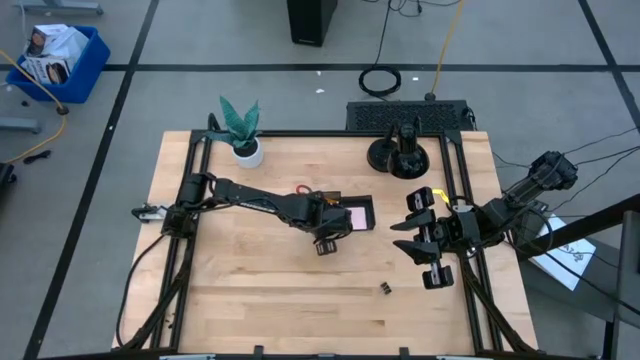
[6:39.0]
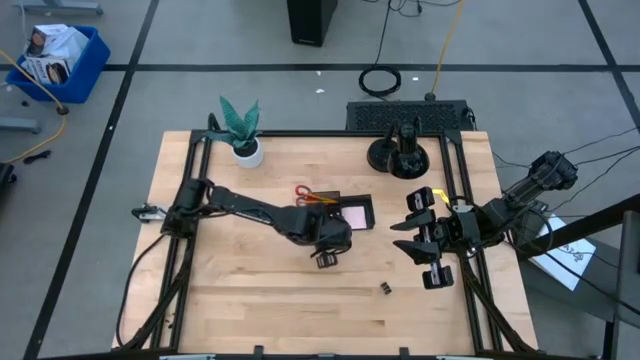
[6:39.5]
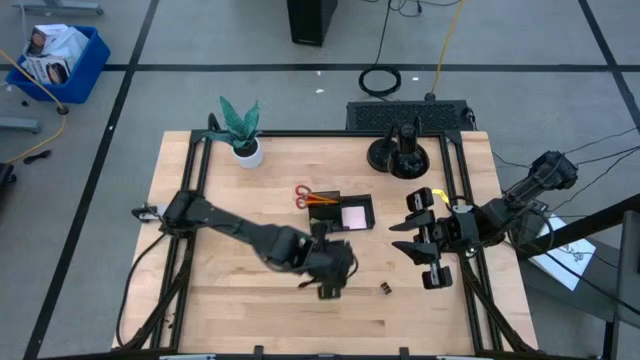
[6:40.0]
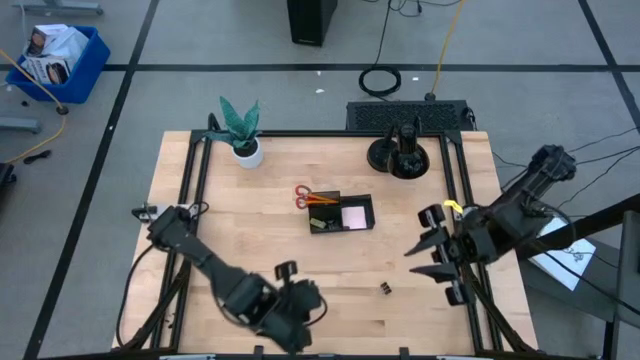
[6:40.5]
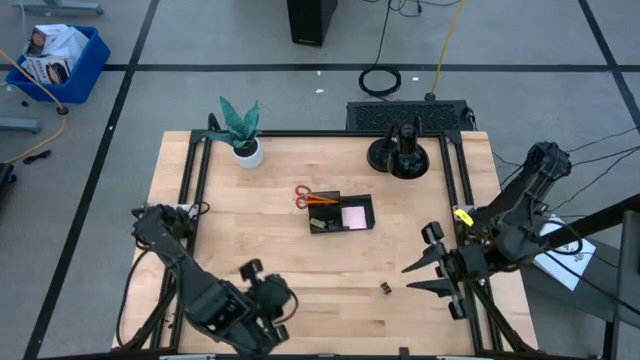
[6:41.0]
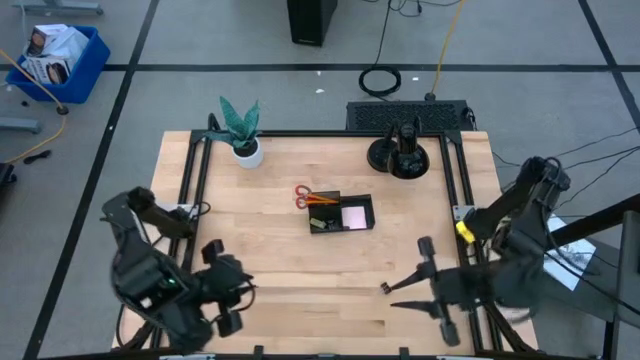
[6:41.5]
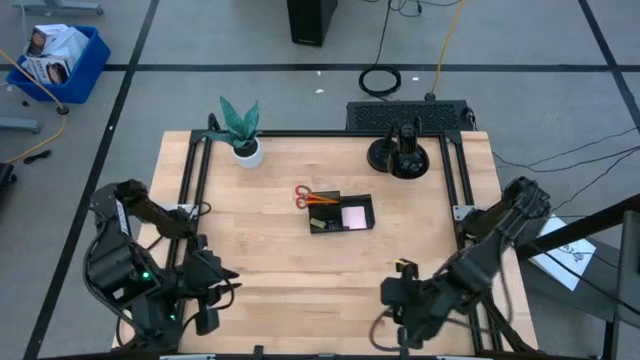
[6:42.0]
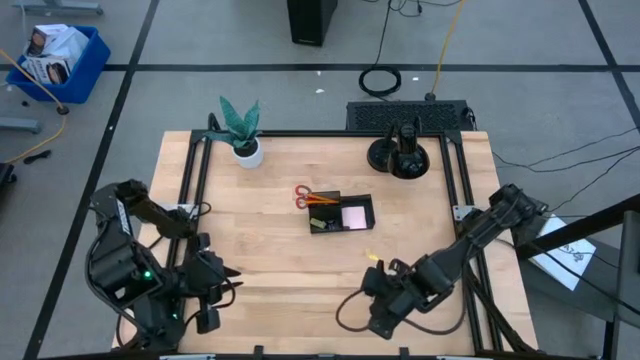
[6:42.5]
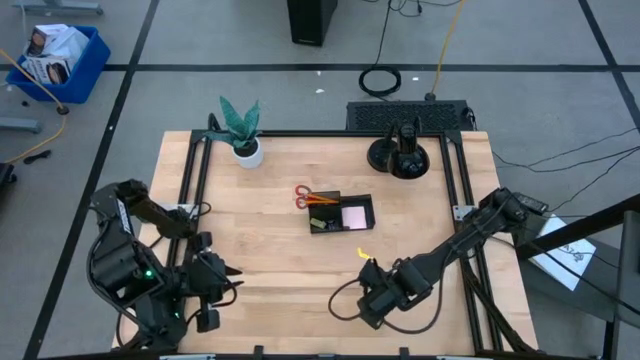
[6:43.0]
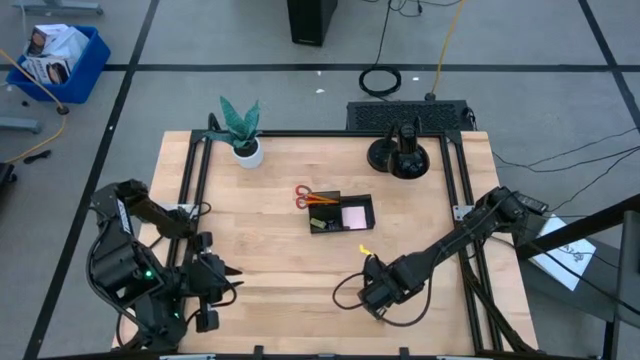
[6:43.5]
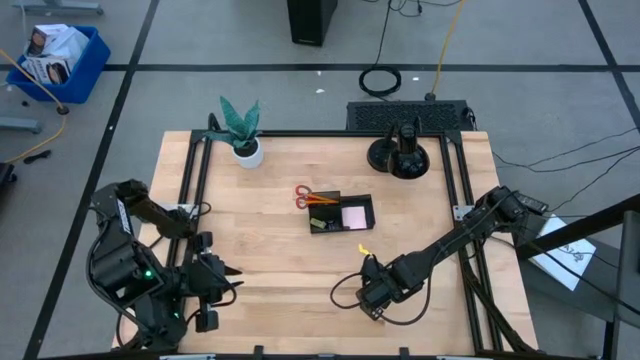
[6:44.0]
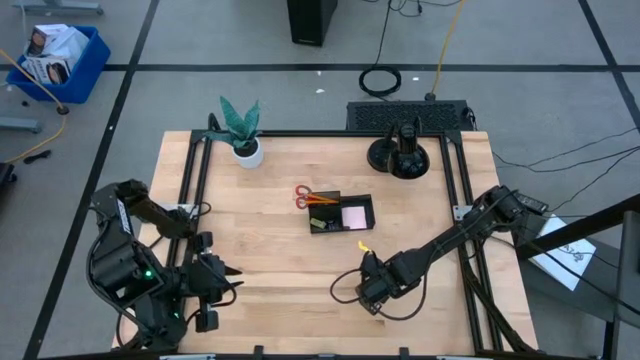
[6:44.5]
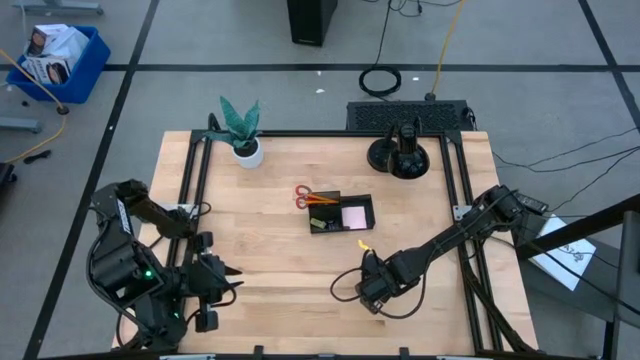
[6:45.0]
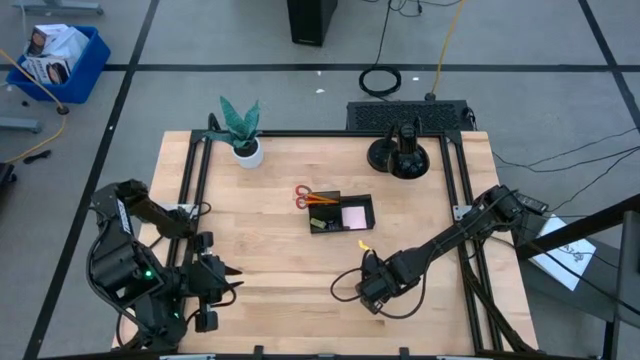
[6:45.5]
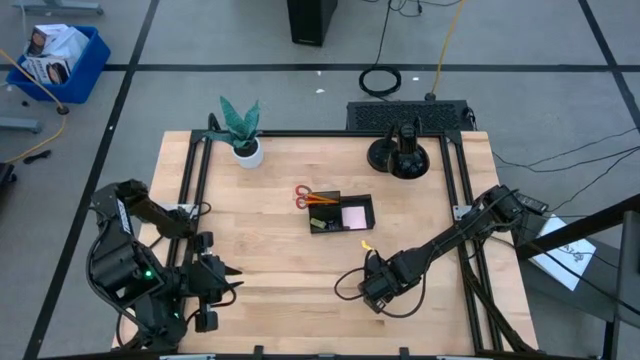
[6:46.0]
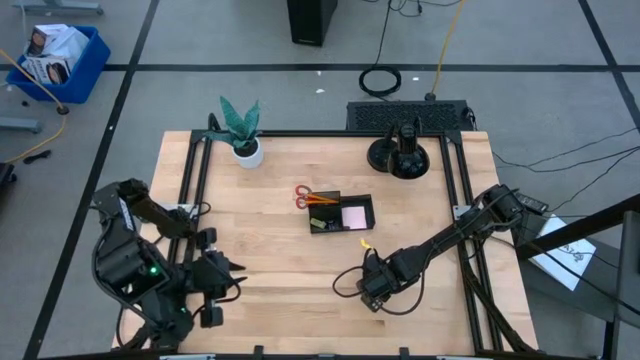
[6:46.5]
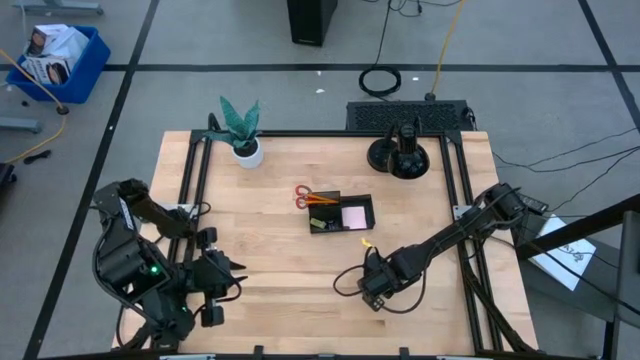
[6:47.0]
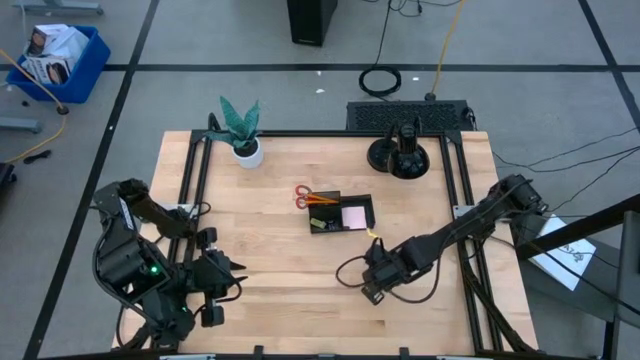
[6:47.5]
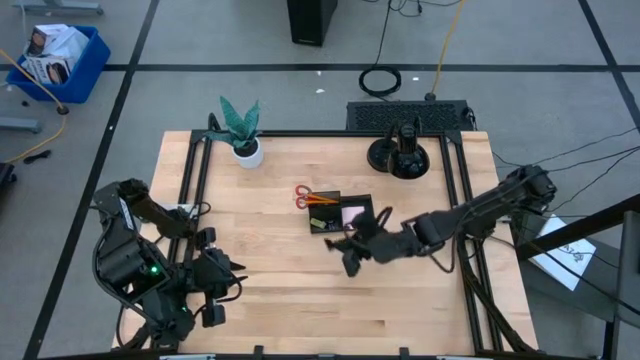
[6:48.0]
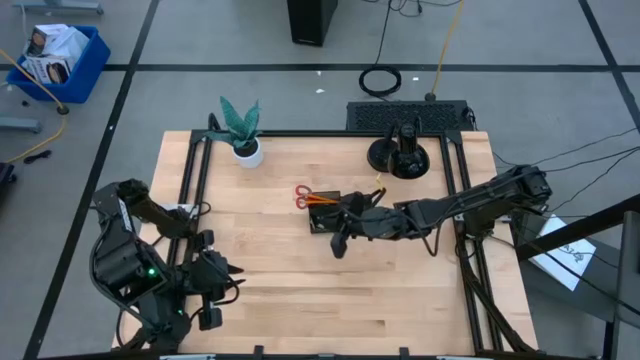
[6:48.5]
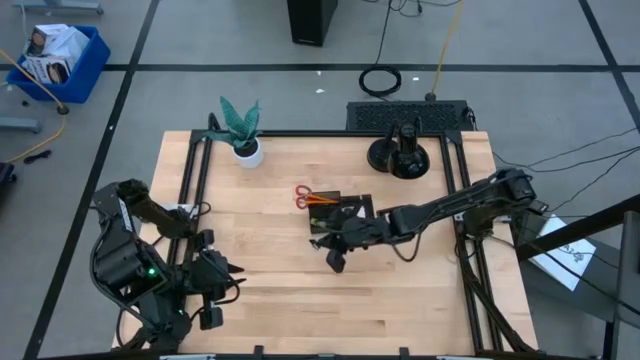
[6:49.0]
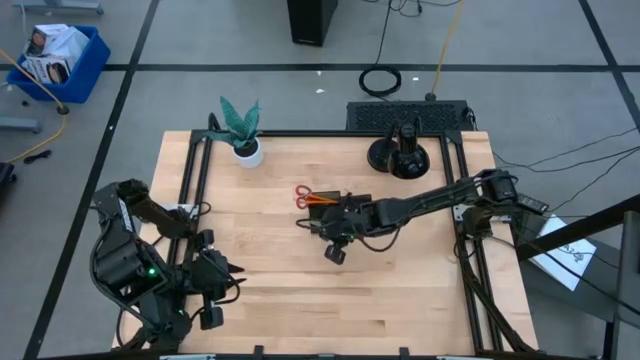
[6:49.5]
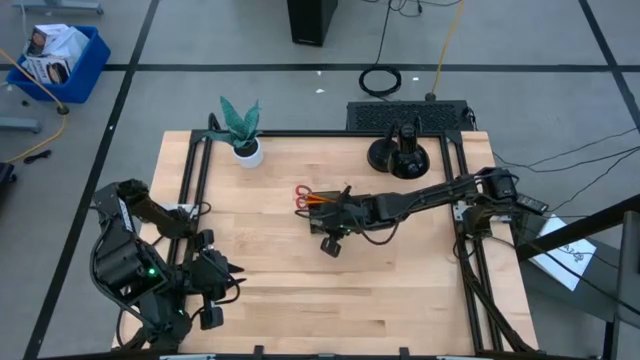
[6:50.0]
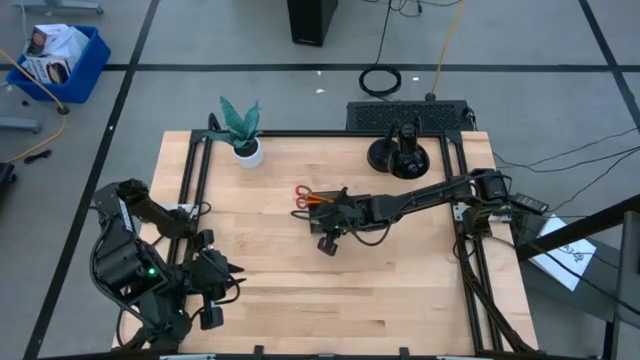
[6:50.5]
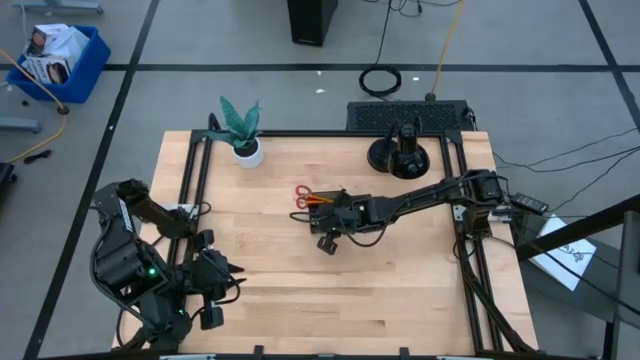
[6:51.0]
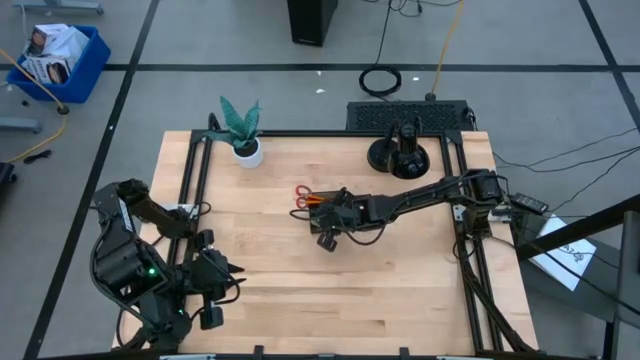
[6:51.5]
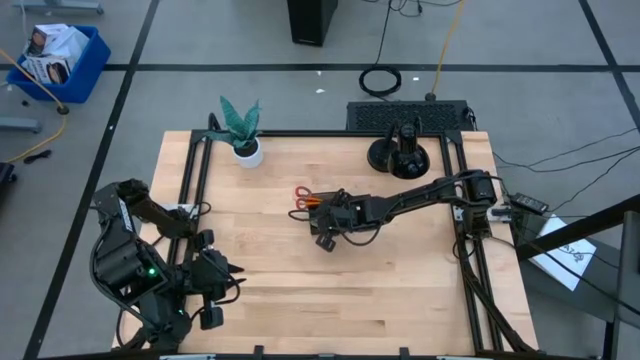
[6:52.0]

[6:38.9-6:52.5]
Task: Pick and place office supplies into organizer
Put the black binder clip into the desk organizer

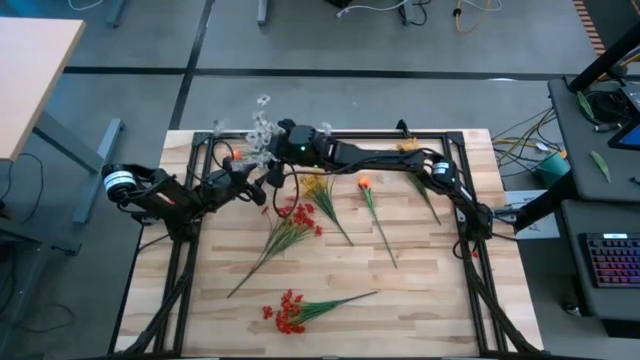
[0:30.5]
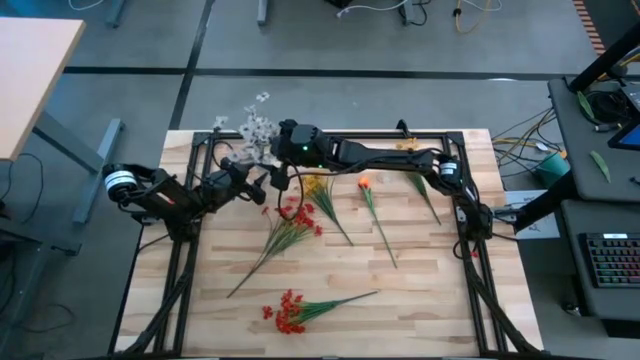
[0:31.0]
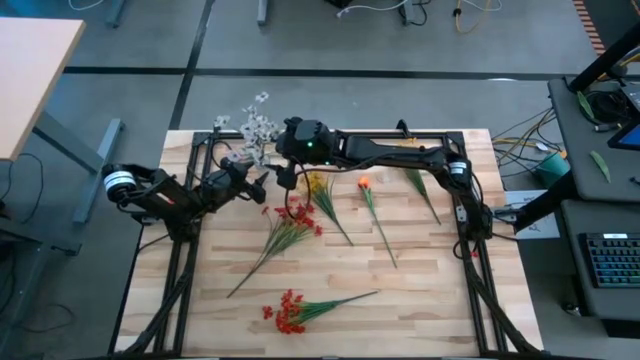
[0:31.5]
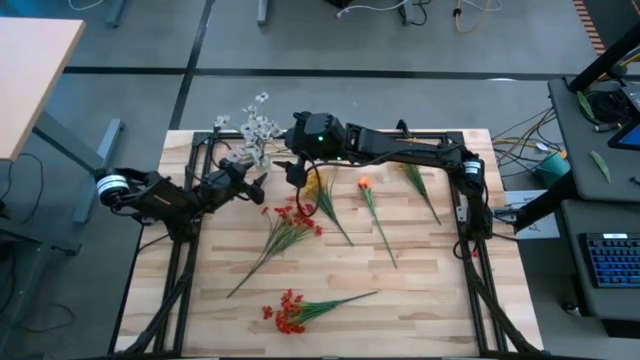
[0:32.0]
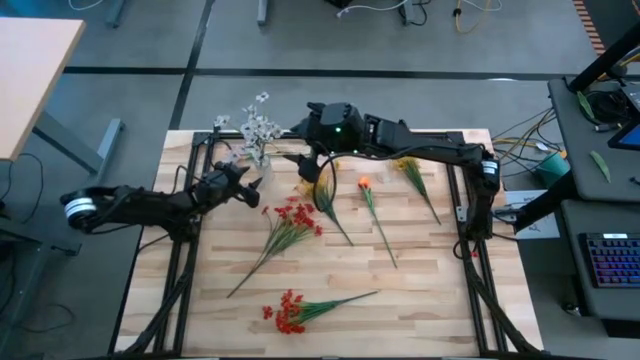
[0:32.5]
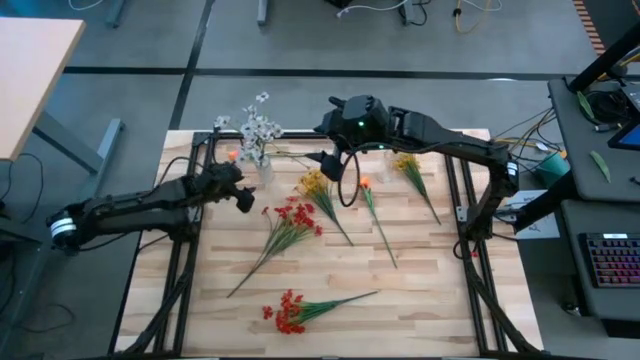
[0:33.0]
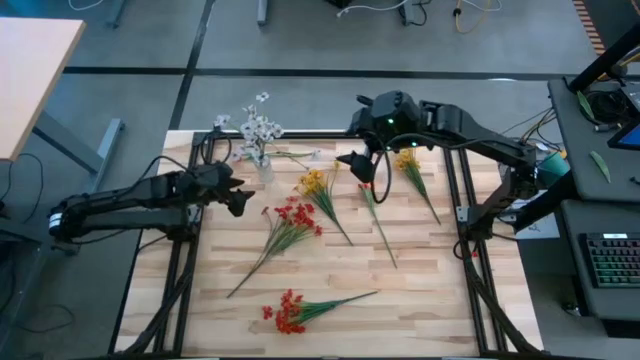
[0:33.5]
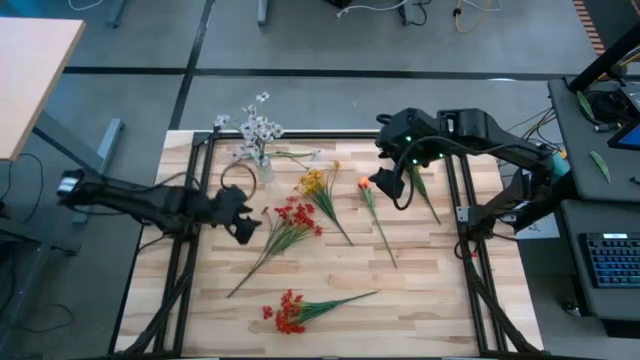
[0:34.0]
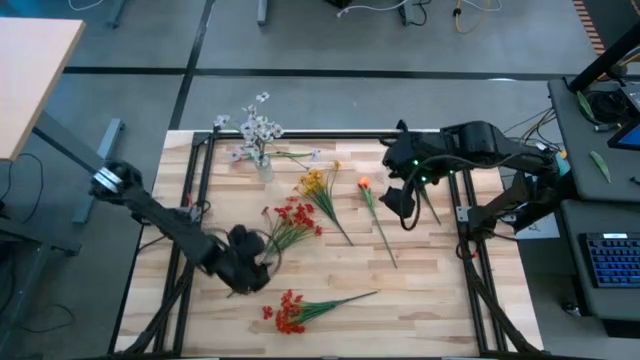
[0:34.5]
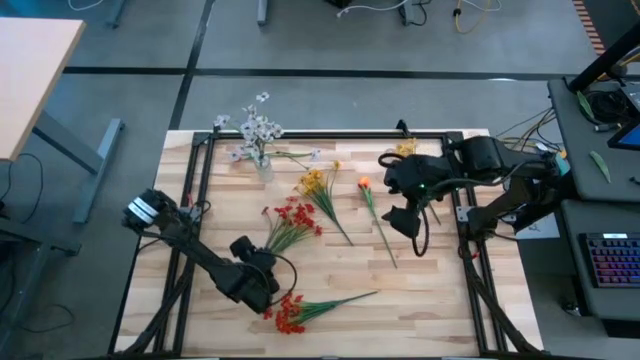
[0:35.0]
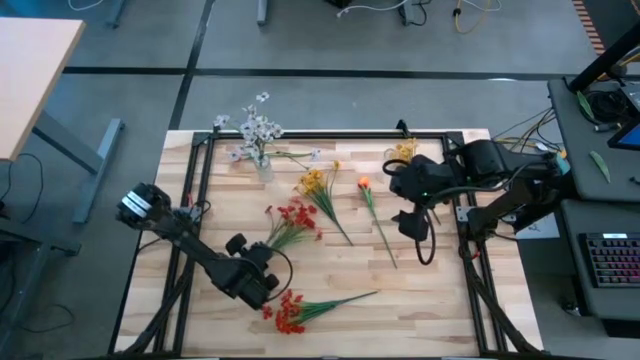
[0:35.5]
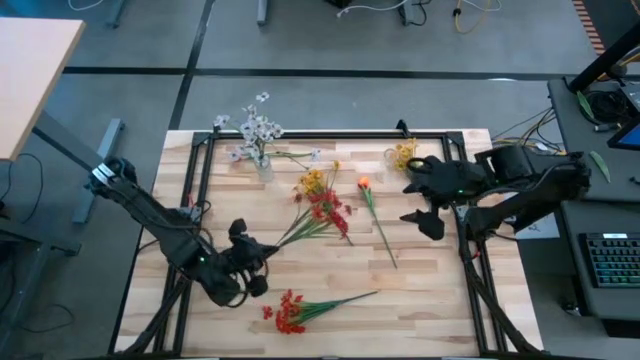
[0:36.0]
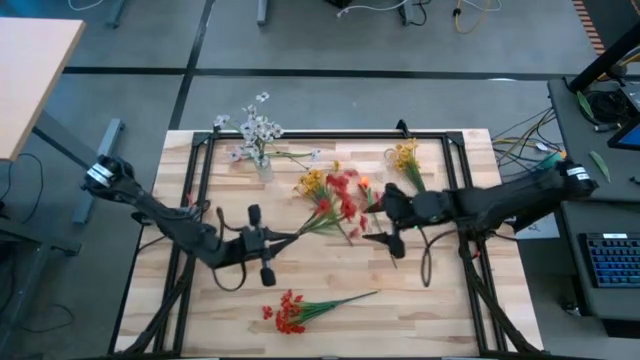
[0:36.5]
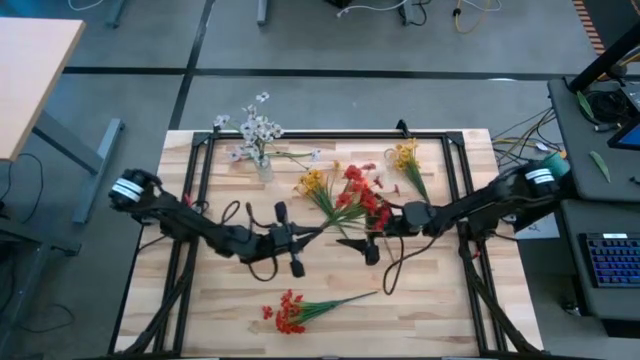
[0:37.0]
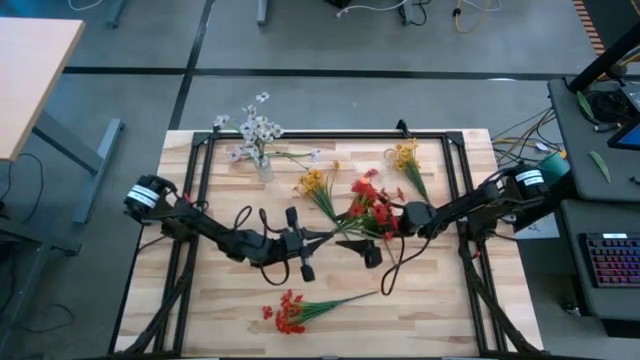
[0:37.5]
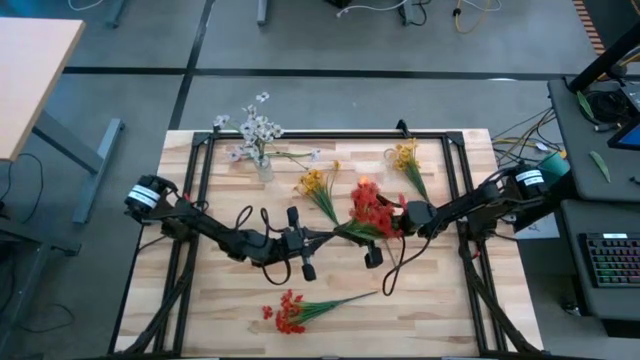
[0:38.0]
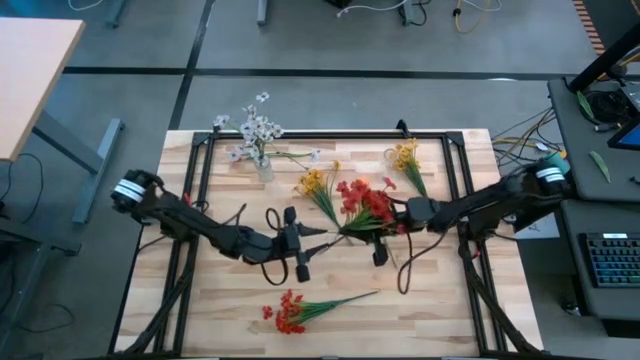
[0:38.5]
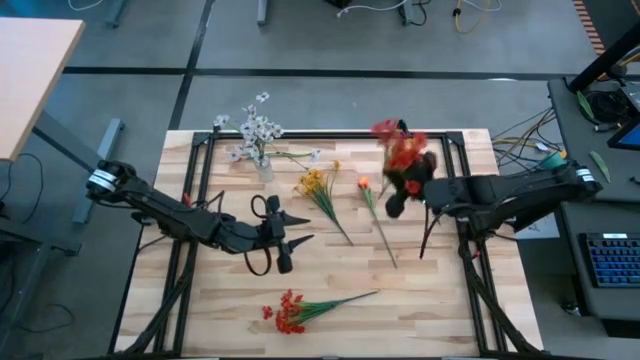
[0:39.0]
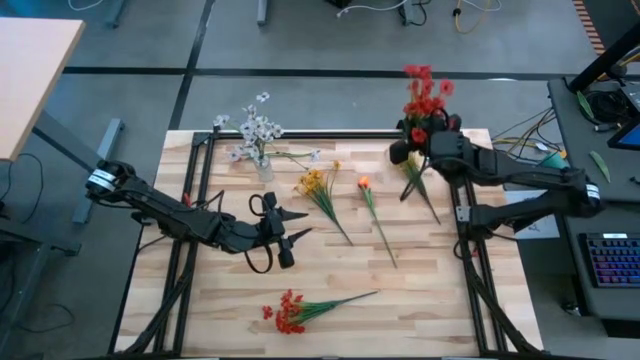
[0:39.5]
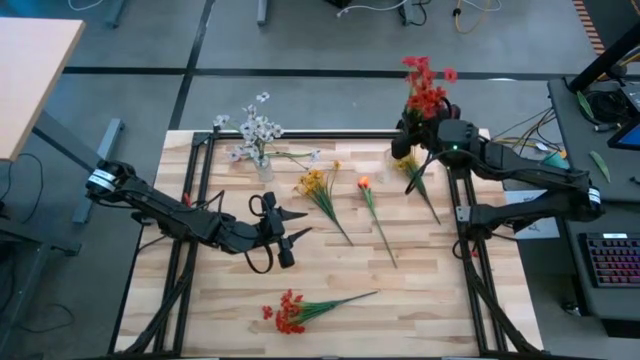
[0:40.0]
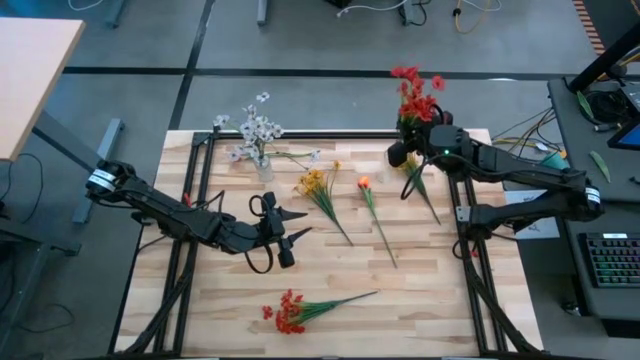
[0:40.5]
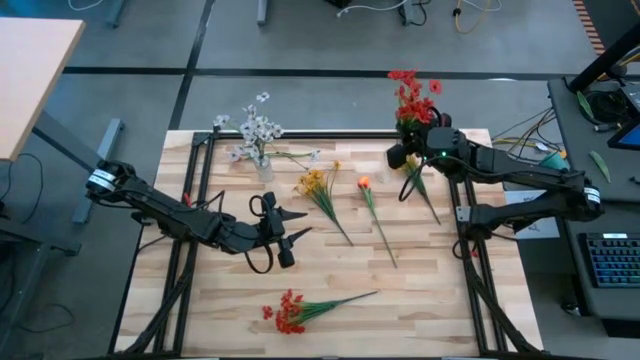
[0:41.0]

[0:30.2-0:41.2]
Task: Sort flowers into vase by color
Put the top red flowers into the right transparent flower vase
